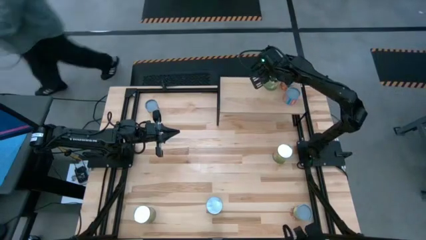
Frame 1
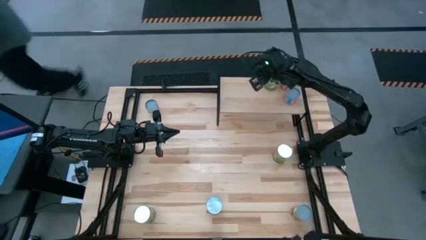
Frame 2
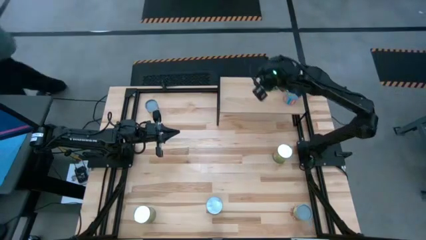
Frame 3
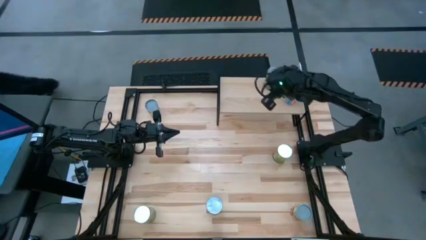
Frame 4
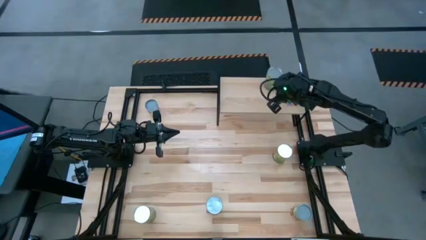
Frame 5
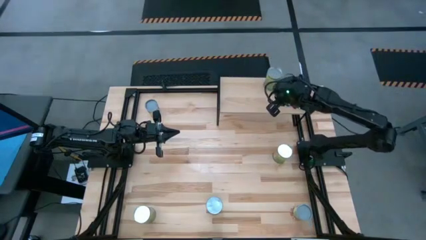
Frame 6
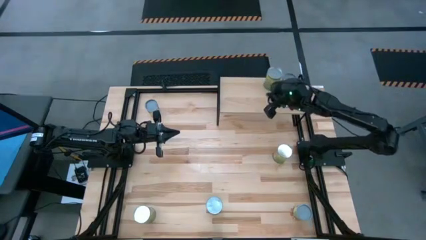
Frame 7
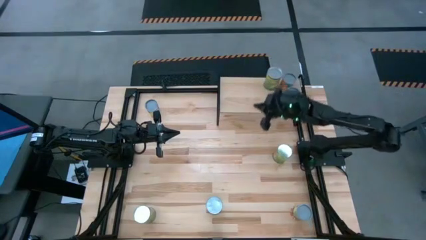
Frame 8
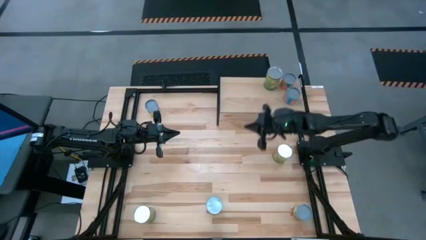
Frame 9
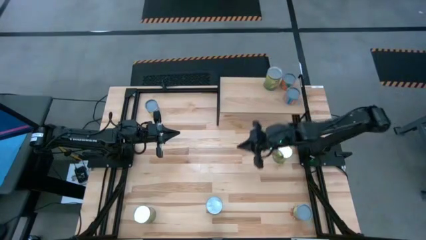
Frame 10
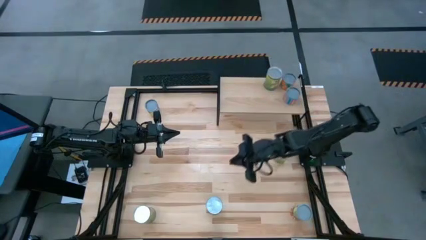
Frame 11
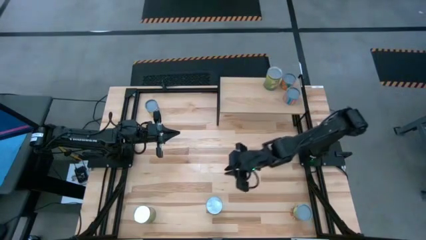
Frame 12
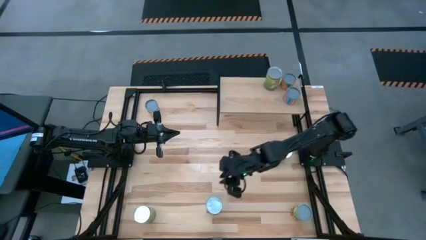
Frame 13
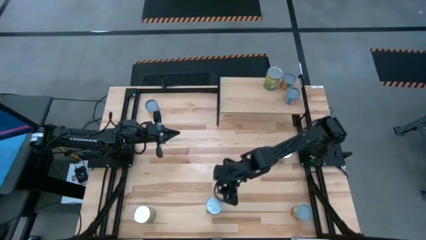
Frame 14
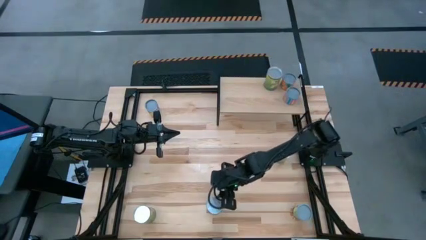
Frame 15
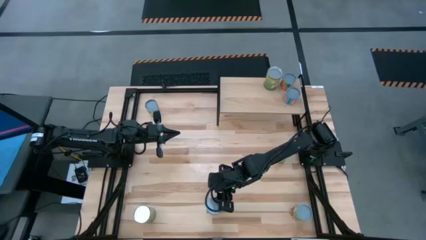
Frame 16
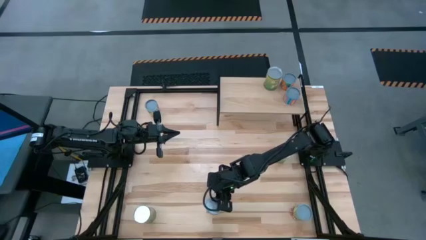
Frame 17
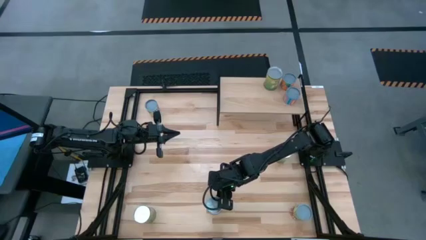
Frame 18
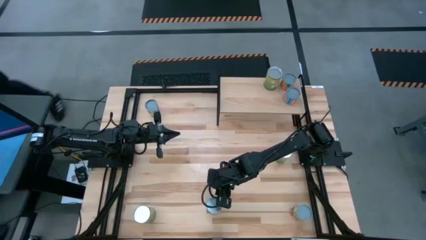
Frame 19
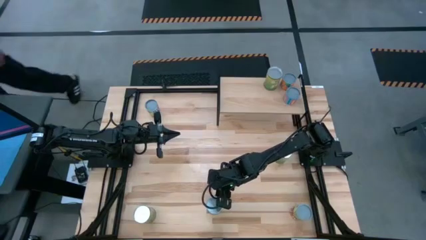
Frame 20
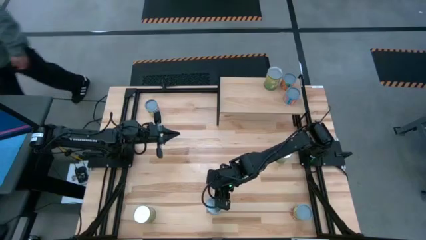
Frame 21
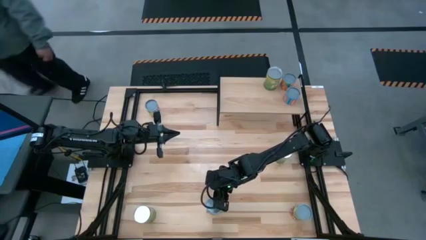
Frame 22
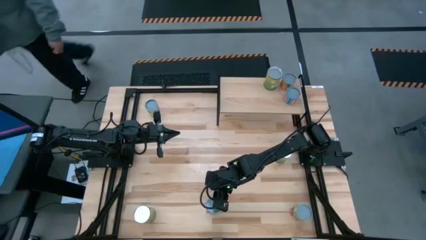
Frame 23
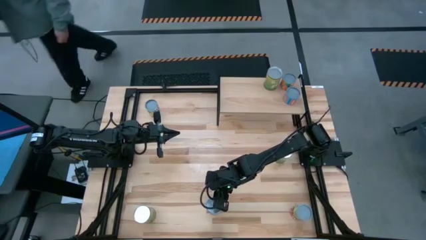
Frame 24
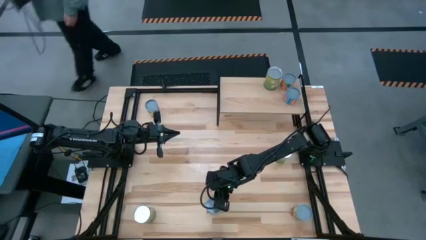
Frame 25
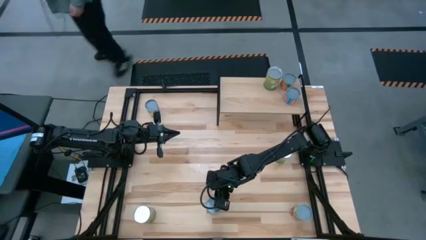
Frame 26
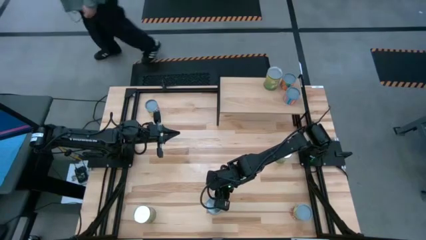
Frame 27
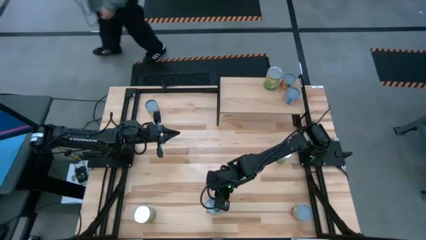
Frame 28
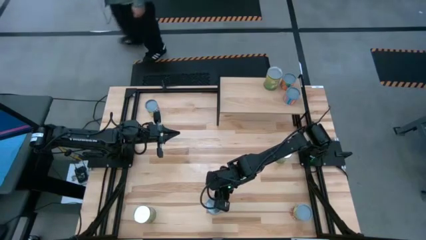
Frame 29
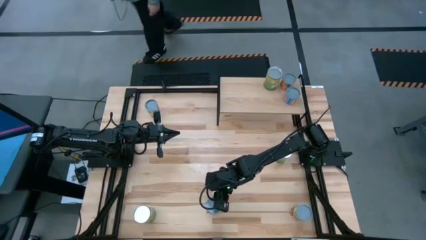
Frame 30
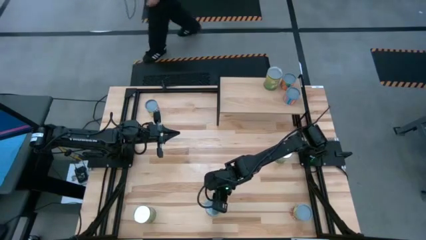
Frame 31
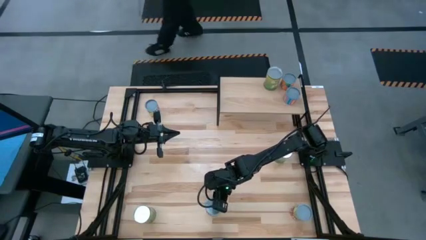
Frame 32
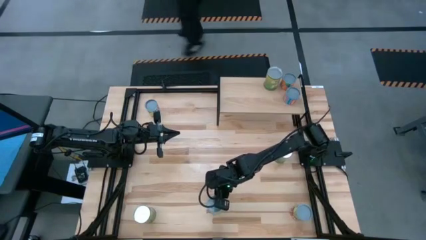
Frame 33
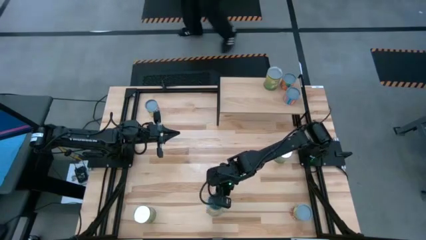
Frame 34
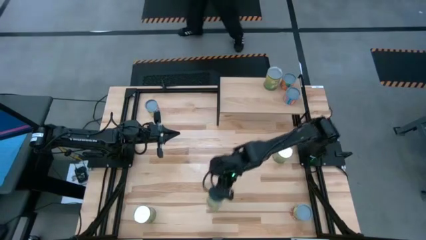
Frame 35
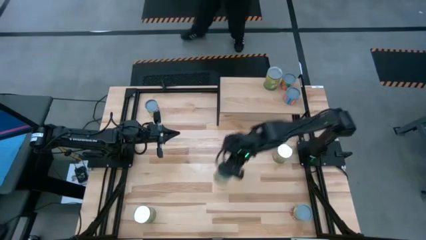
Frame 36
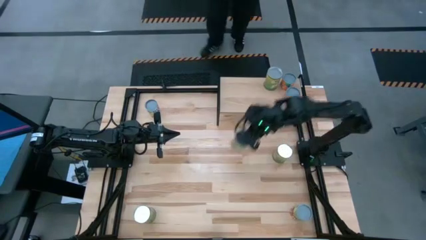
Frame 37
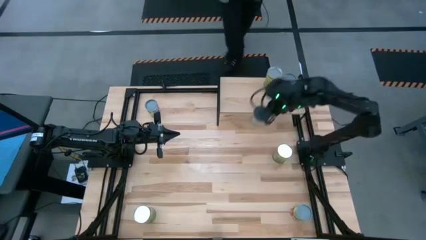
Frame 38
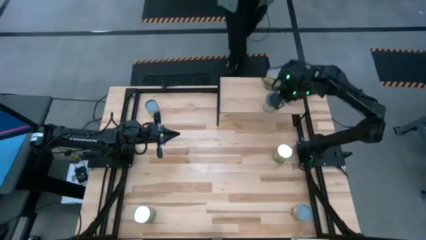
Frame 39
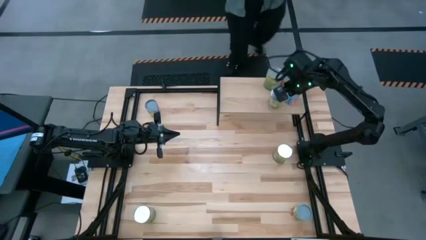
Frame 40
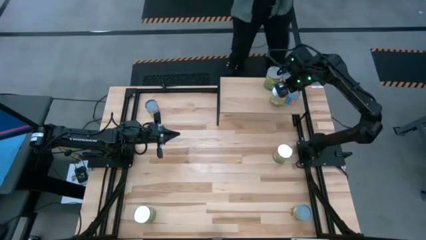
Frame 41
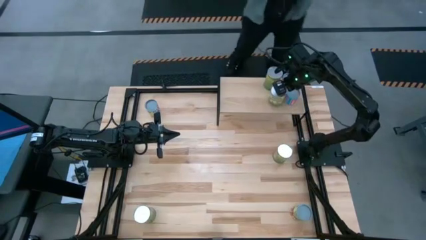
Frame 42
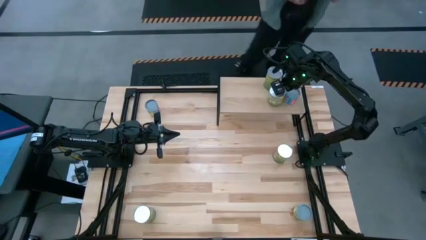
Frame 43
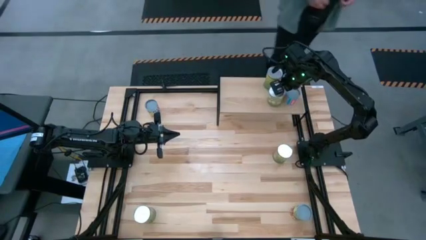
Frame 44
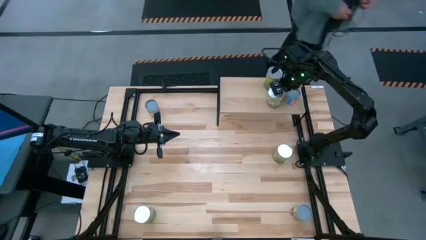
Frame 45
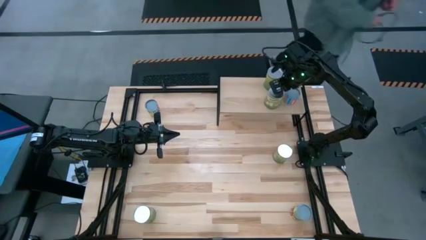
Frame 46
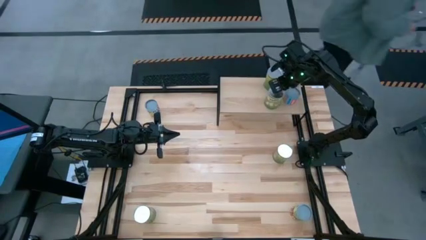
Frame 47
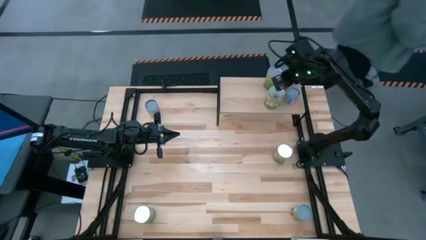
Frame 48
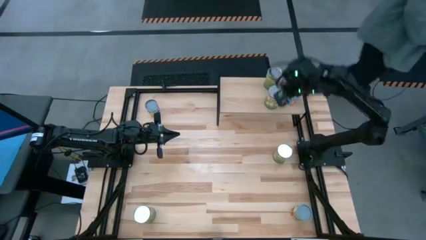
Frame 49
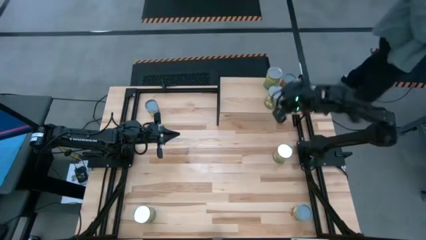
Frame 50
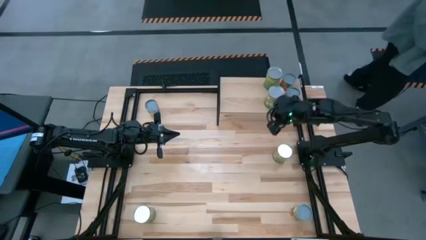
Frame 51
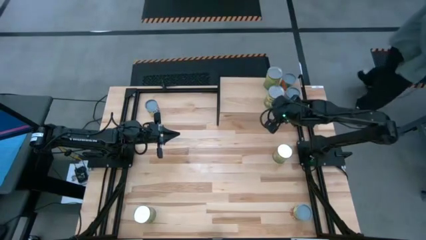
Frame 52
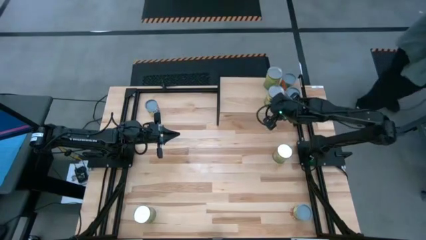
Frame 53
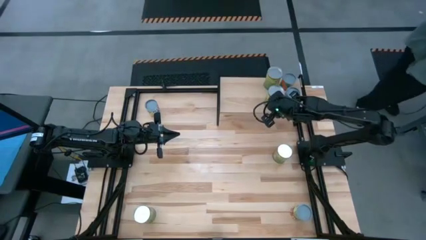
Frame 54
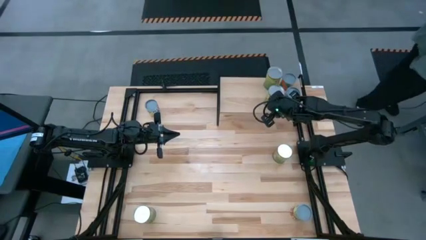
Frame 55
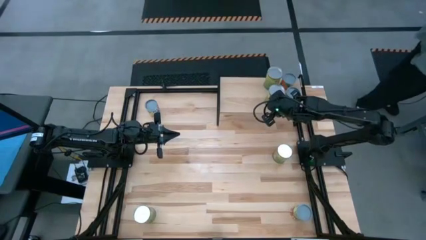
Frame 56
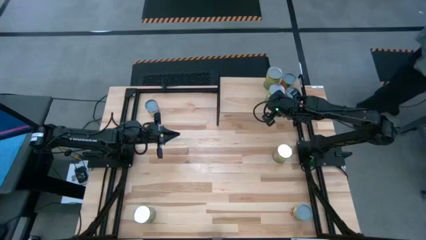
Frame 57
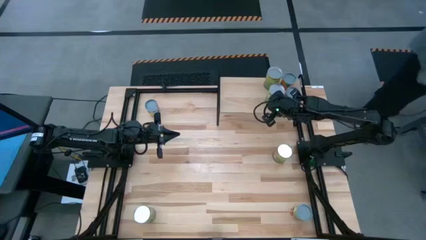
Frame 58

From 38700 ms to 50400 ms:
Task: Pick and place cans onto a shelf
Put the canned pears on the shelf and aligned with the canned pears

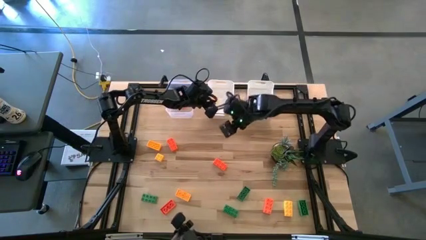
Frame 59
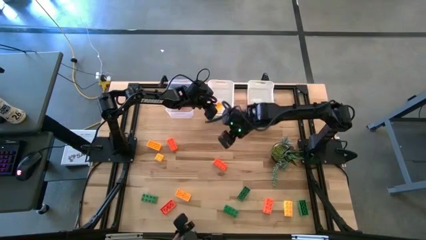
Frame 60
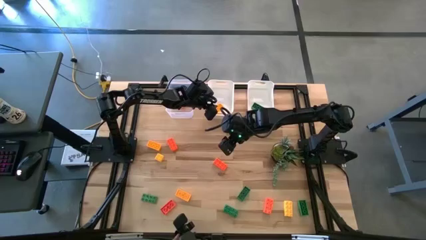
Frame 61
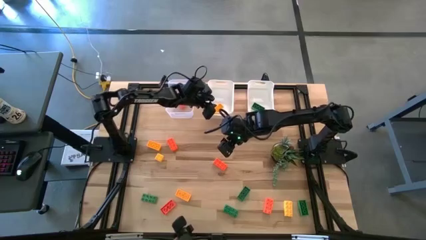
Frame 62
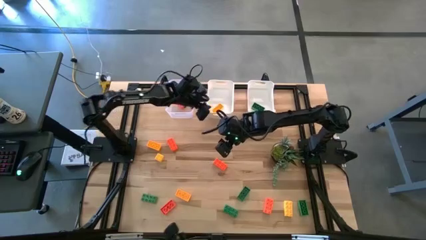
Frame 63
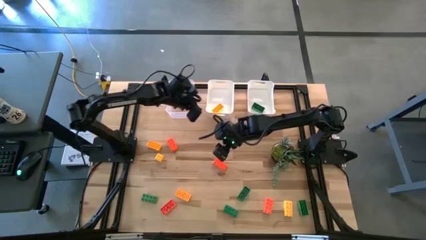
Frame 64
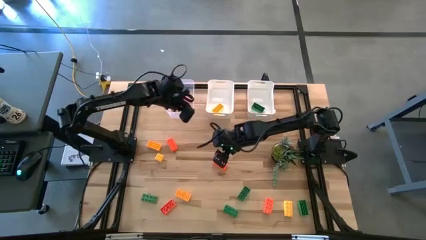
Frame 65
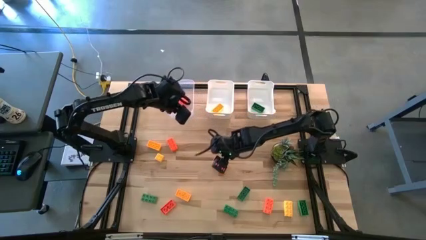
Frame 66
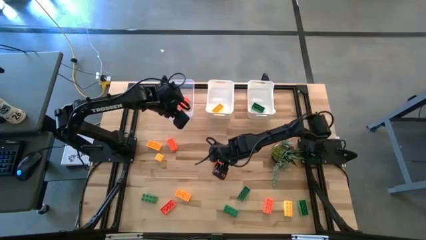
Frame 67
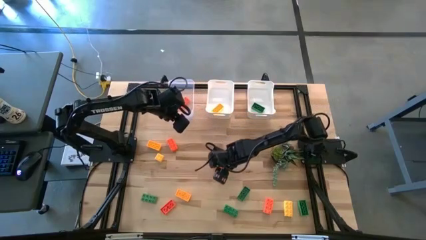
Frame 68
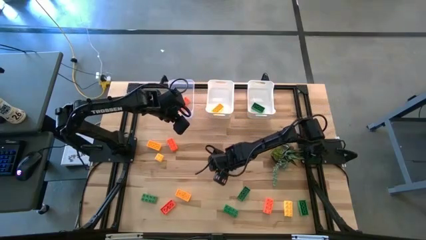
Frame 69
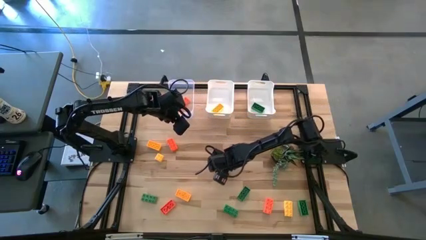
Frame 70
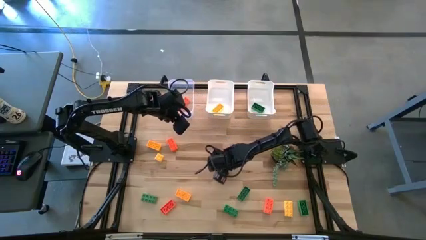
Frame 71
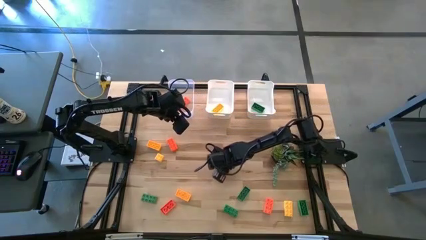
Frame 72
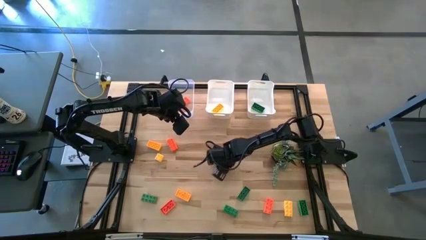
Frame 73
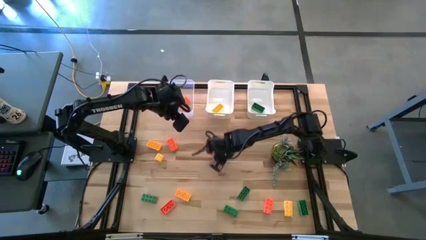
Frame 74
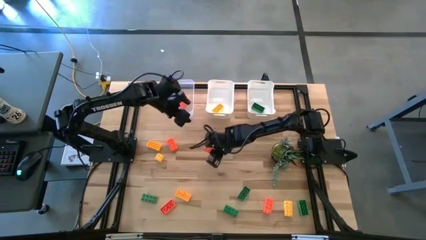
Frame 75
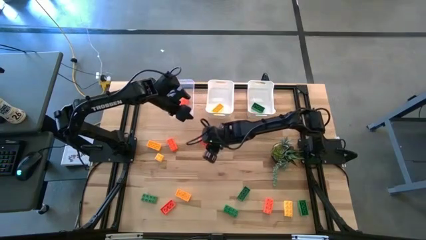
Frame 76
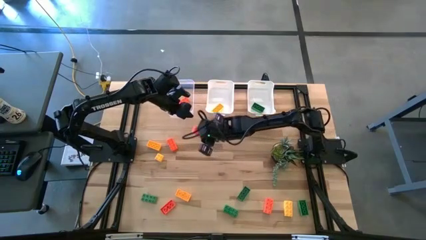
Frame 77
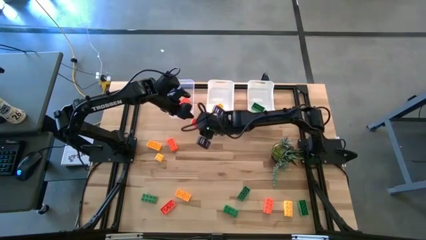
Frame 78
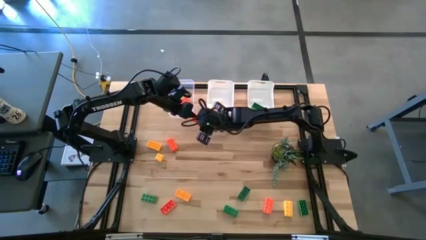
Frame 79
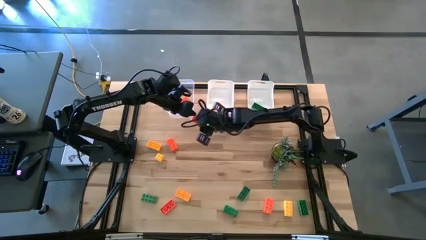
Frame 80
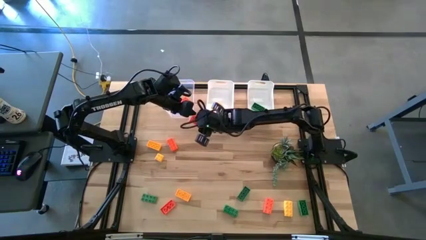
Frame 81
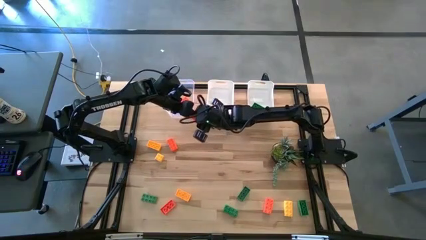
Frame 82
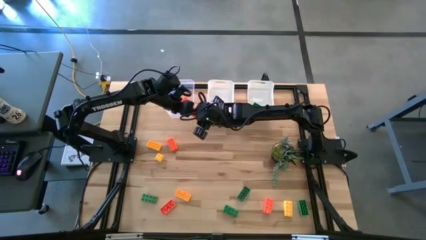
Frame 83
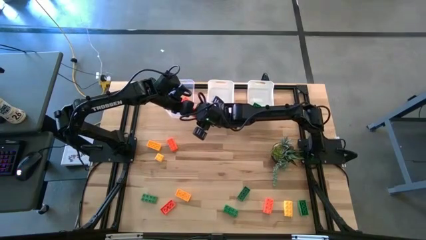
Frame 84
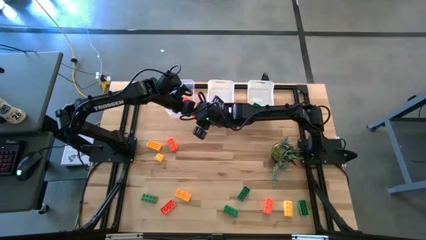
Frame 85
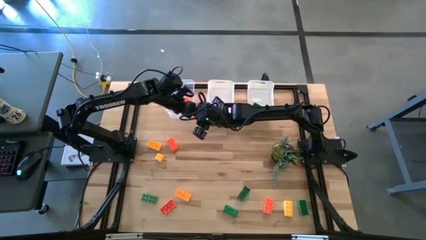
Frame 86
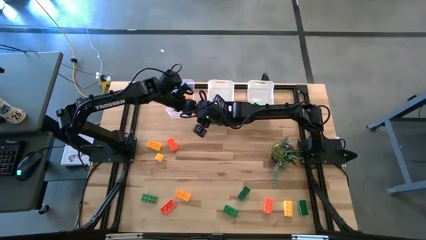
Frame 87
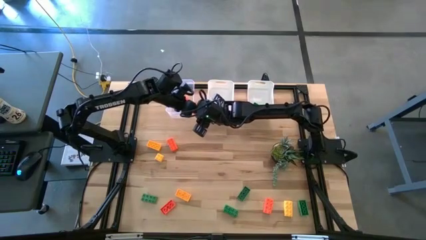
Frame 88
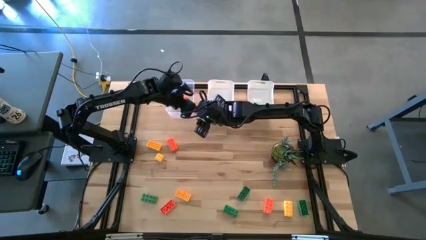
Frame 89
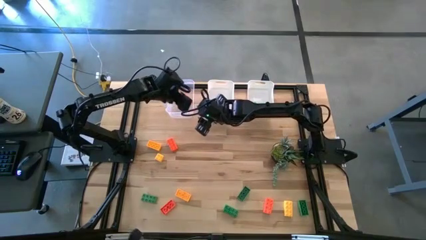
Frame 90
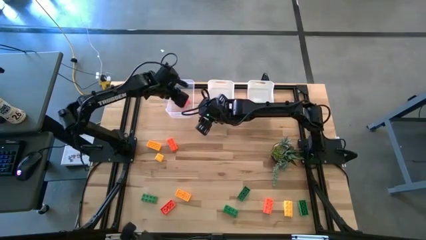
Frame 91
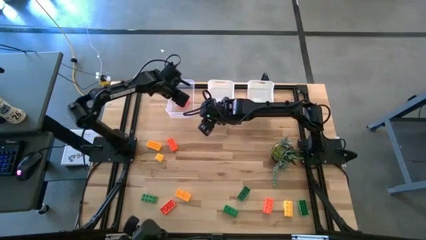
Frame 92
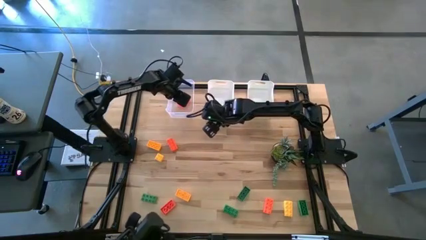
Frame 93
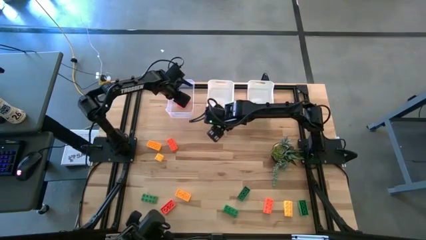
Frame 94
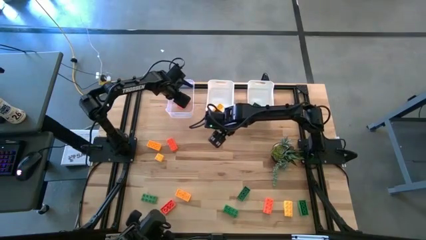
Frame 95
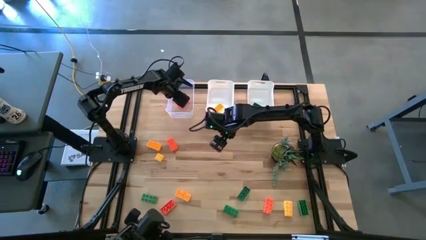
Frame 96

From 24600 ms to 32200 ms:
Task: Sort & place blocks by color
Put the orange game piece into the transparent bin
